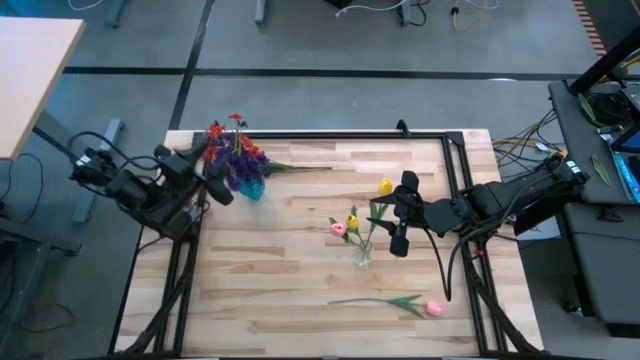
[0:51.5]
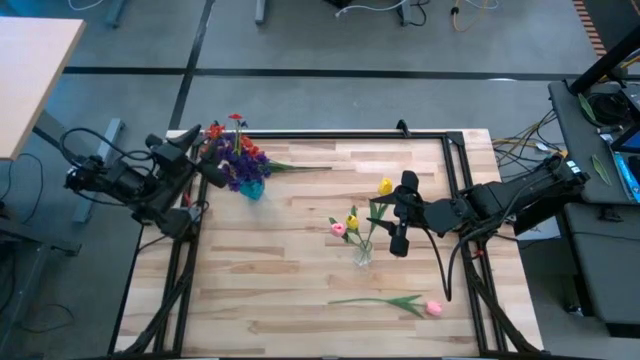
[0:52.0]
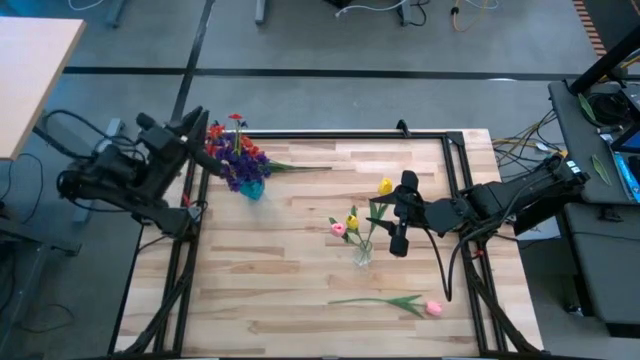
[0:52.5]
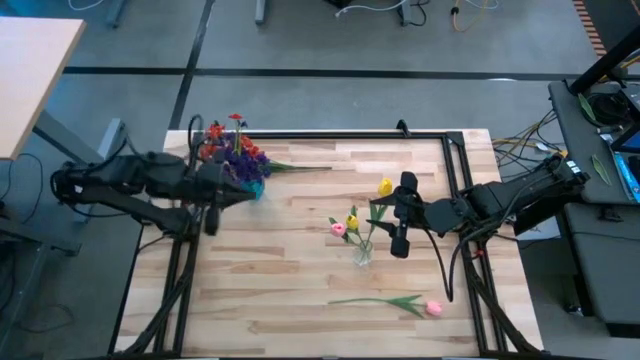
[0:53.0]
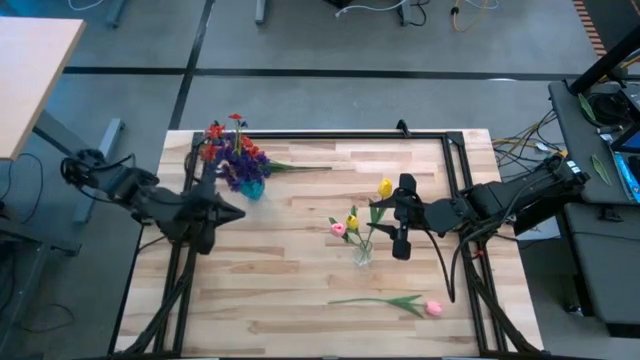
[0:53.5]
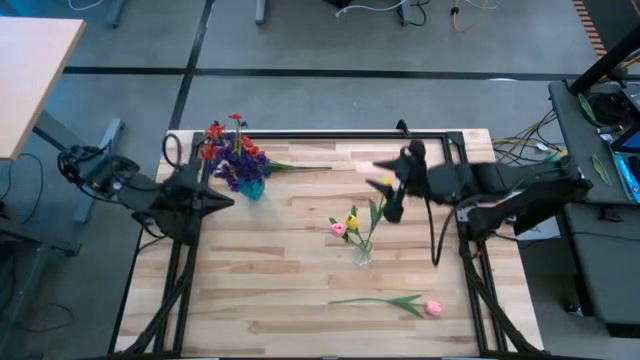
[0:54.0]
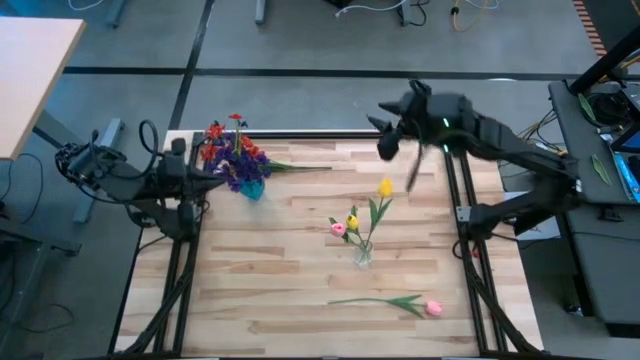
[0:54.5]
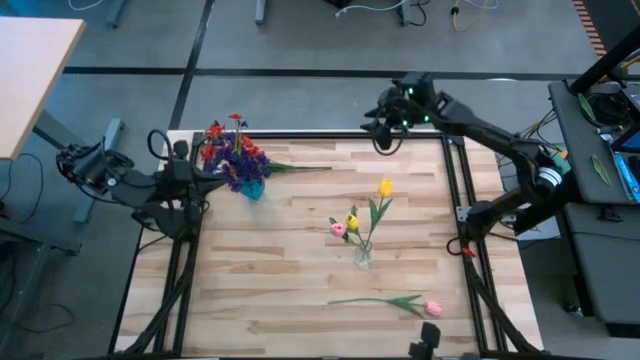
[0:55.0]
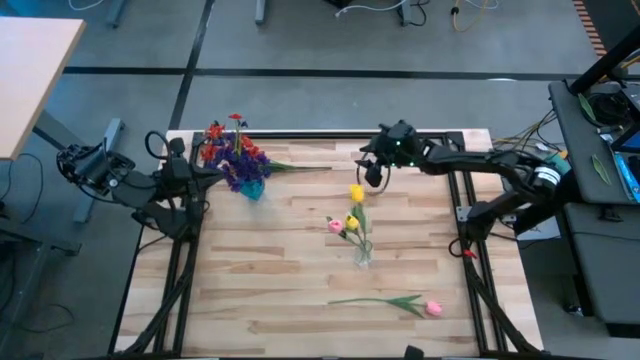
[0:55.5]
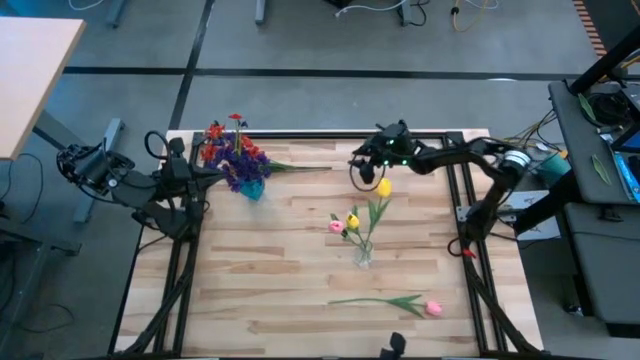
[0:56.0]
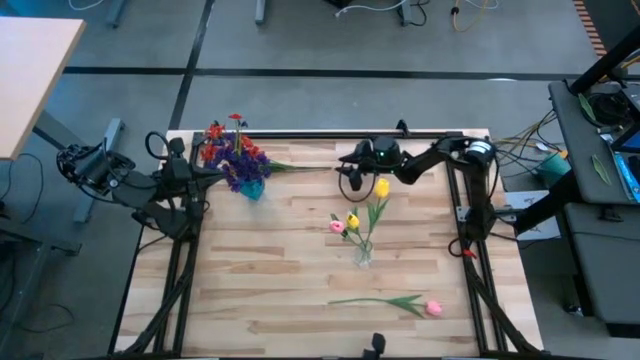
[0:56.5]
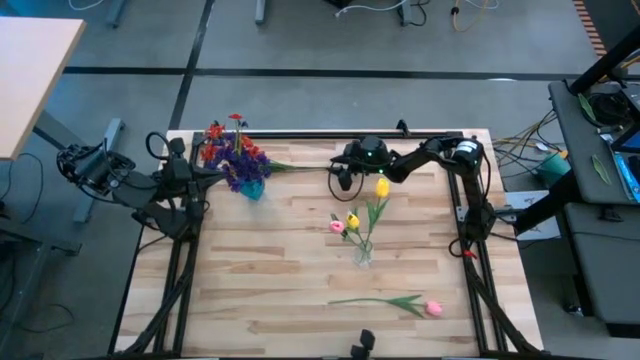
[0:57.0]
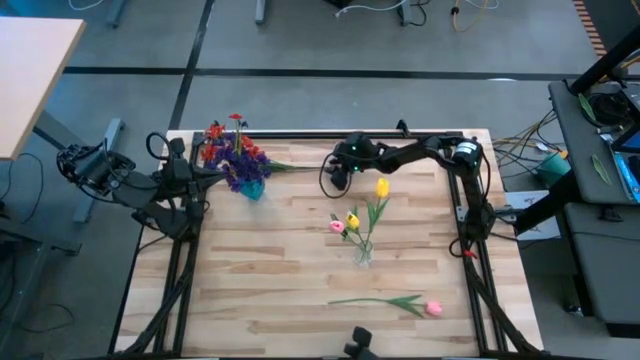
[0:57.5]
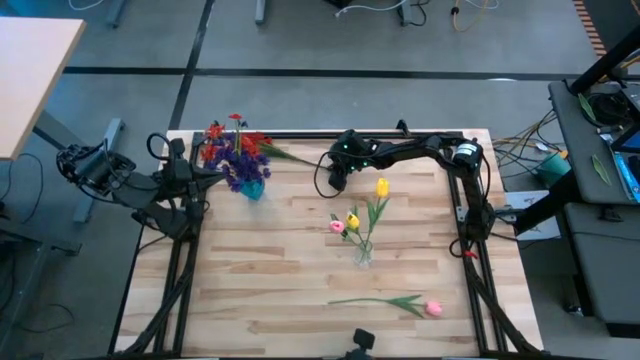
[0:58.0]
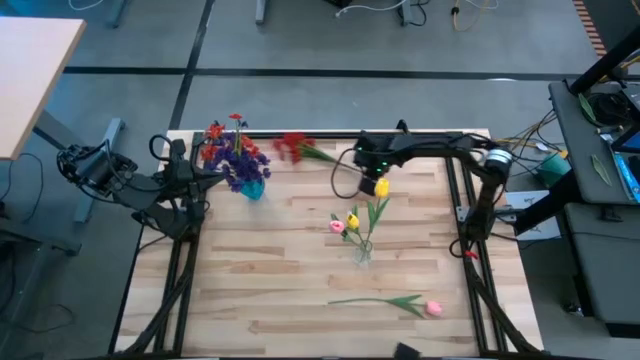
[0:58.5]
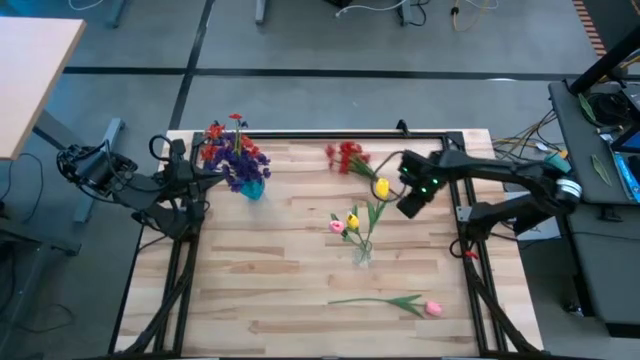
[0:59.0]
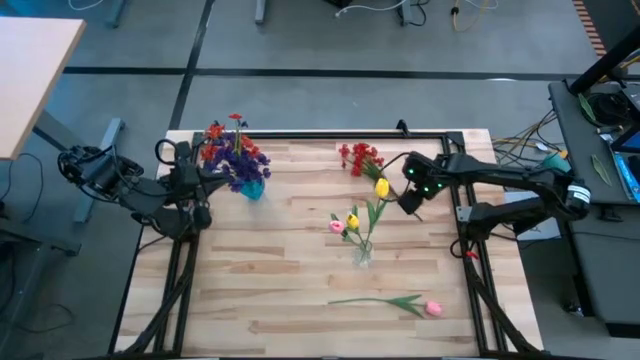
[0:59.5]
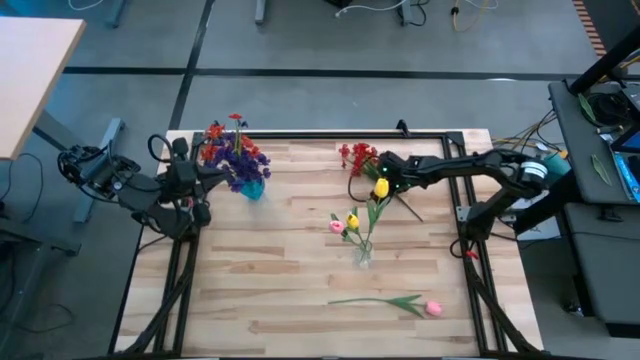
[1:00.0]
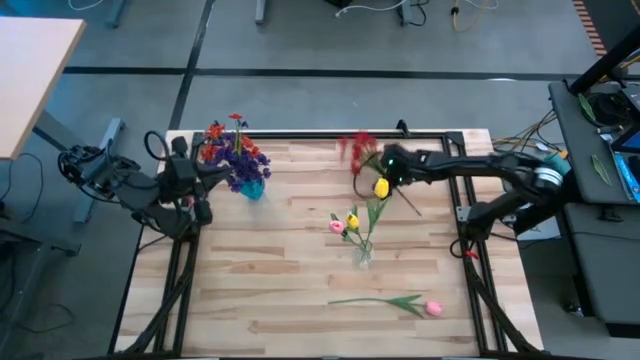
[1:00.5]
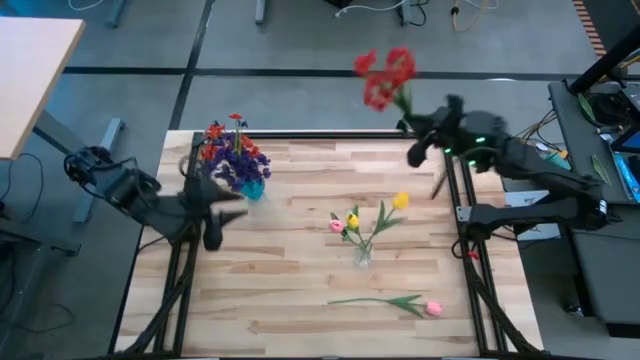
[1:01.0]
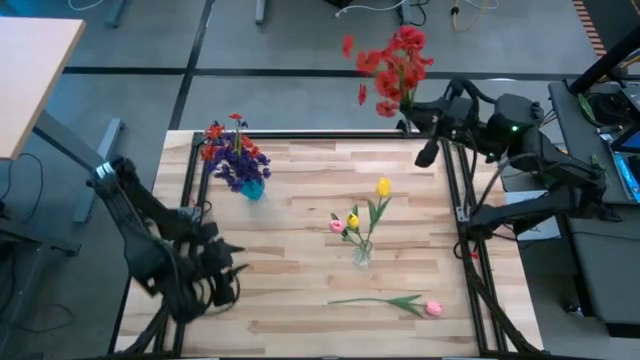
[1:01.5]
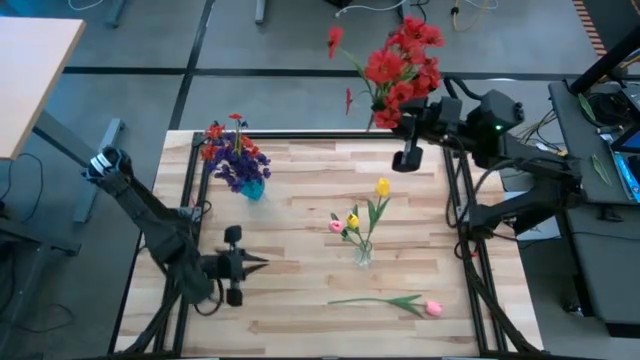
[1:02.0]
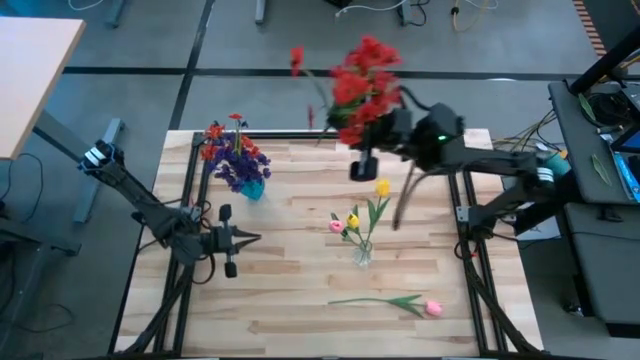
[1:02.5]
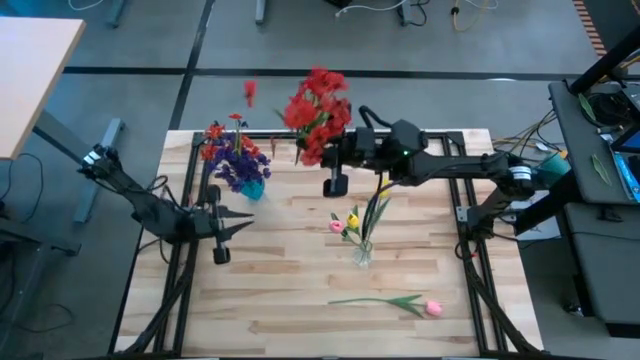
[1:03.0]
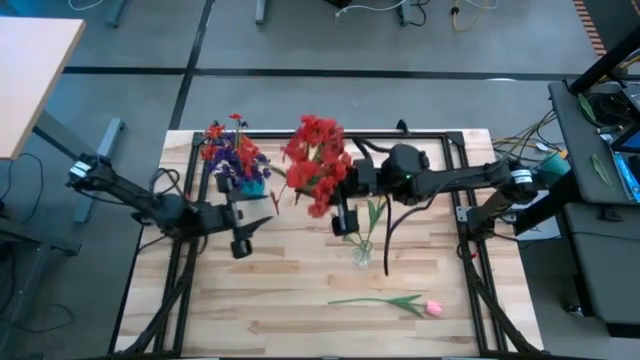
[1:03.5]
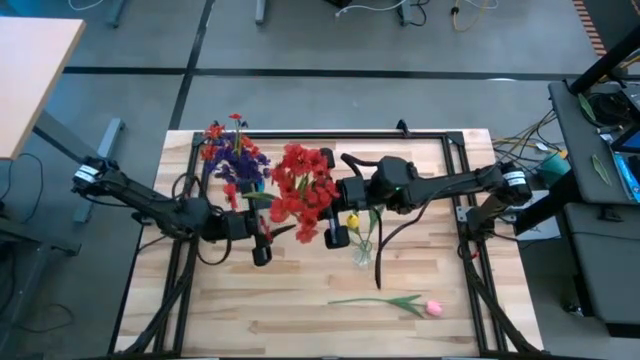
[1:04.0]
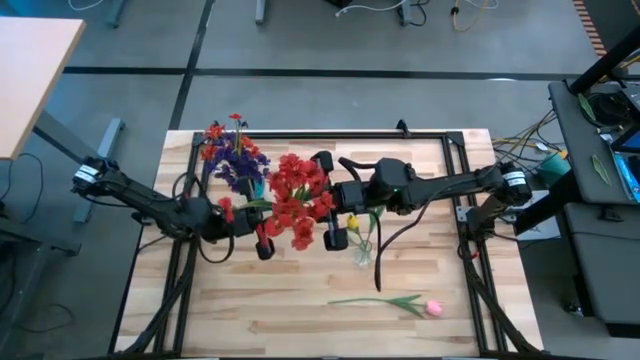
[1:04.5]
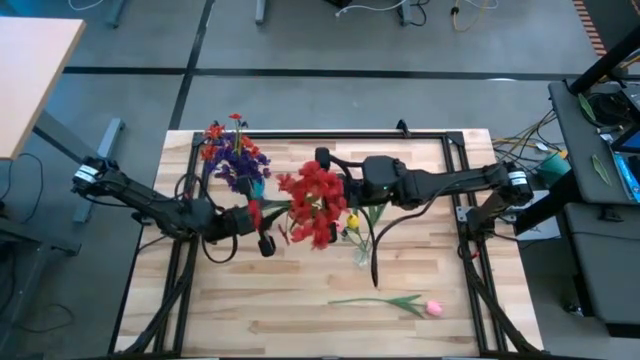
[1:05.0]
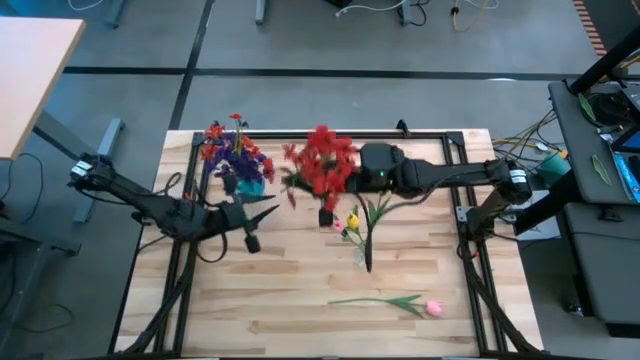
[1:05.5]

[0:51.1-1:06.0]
Task: Sort flowers into vase by color
Put the red flowers into the blue vase

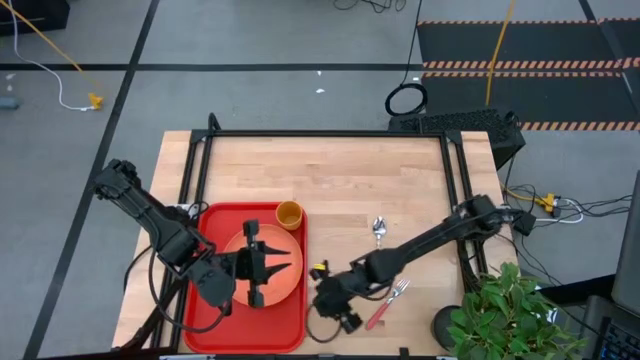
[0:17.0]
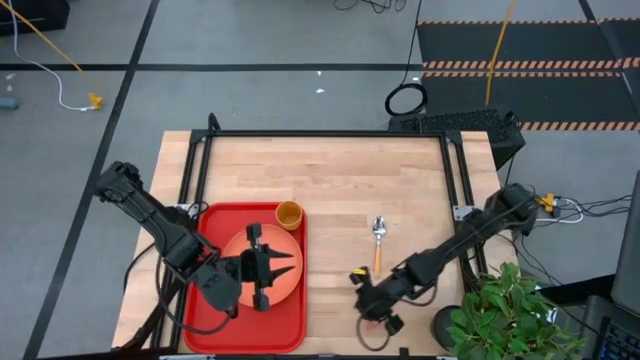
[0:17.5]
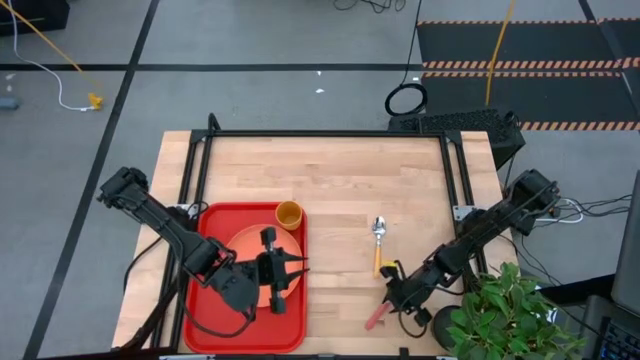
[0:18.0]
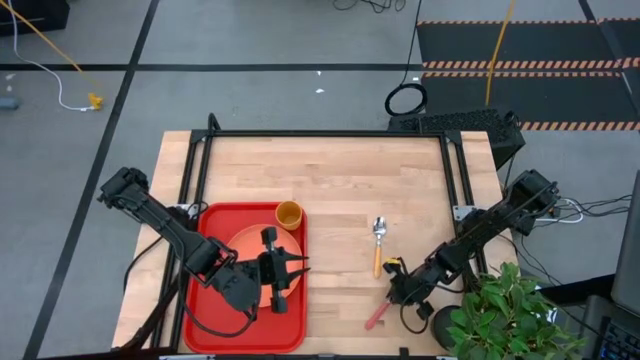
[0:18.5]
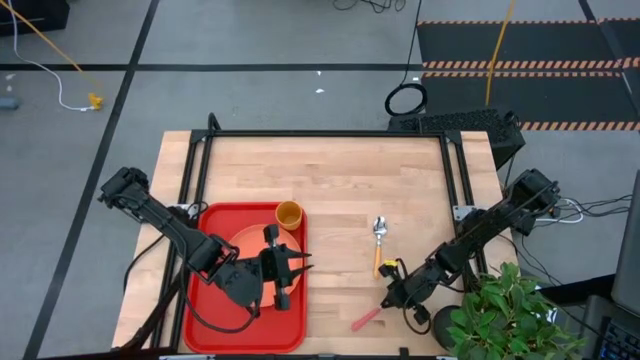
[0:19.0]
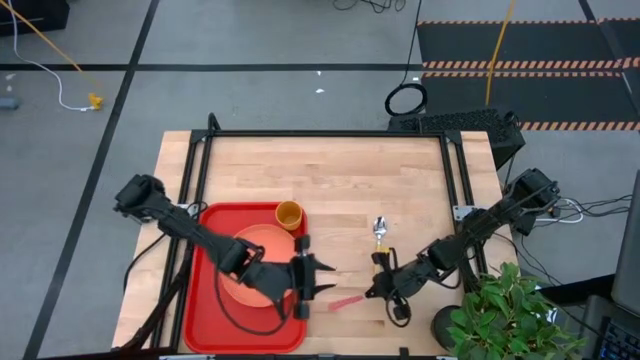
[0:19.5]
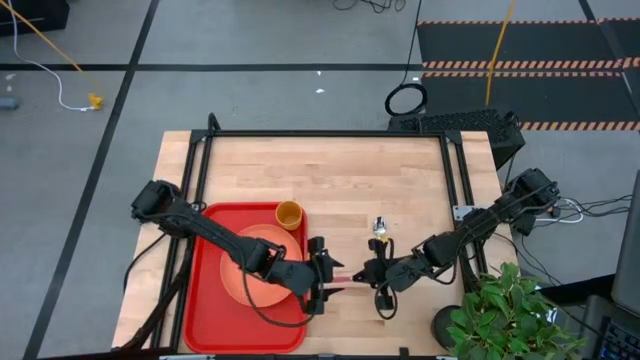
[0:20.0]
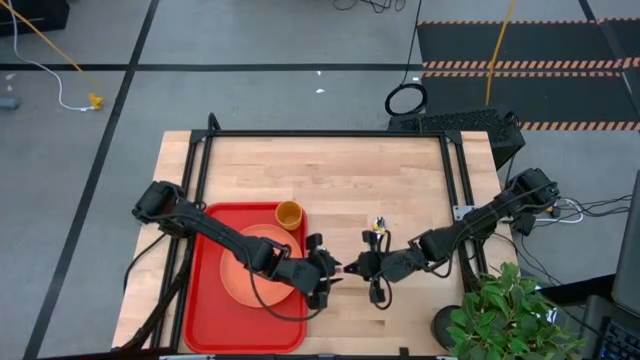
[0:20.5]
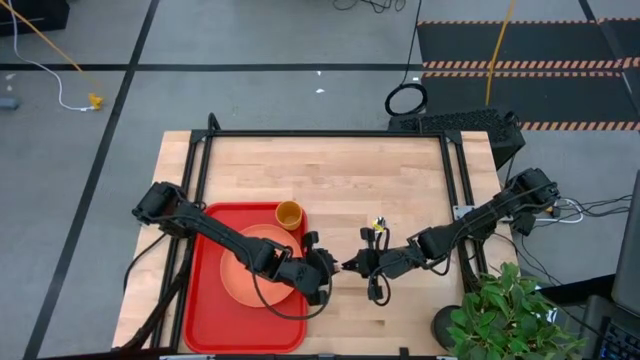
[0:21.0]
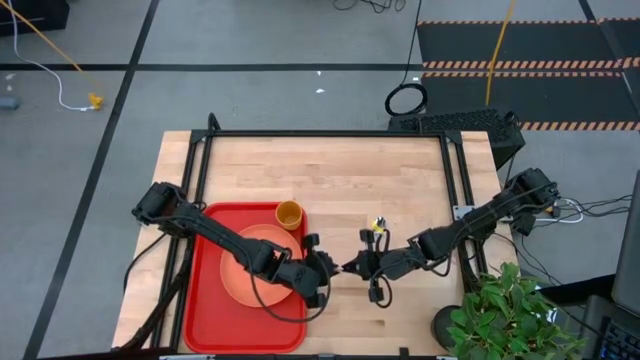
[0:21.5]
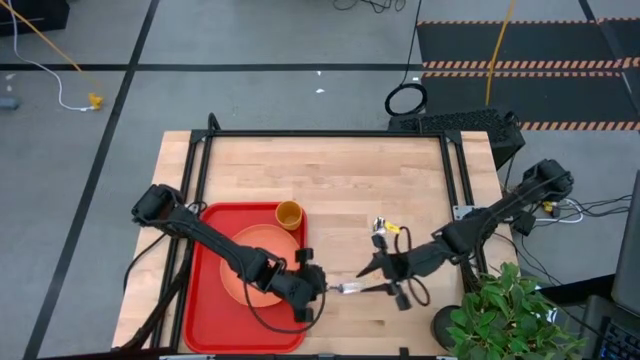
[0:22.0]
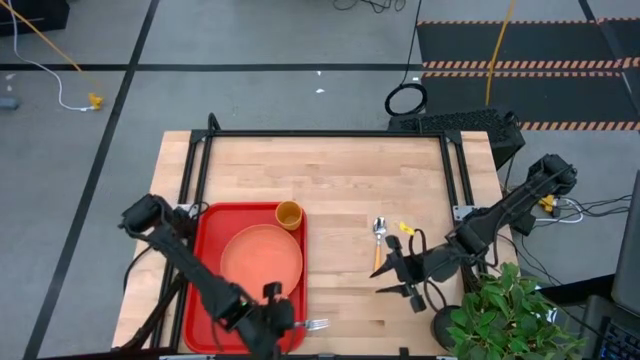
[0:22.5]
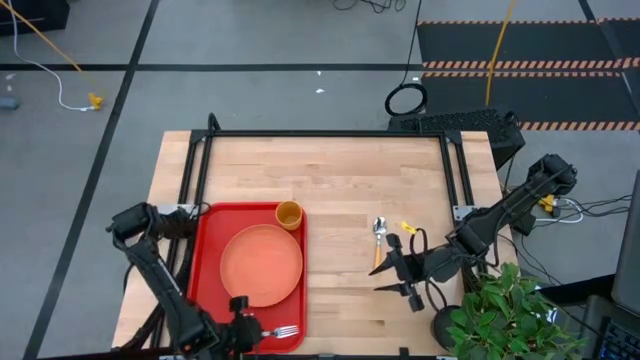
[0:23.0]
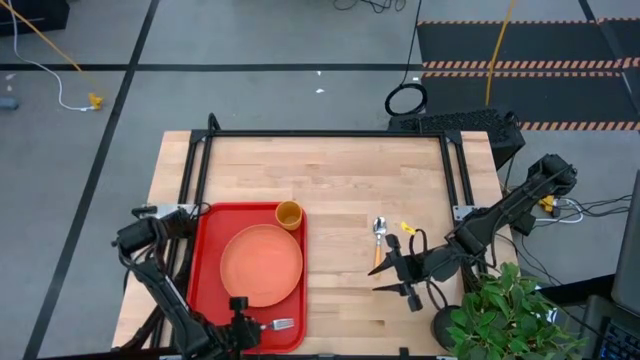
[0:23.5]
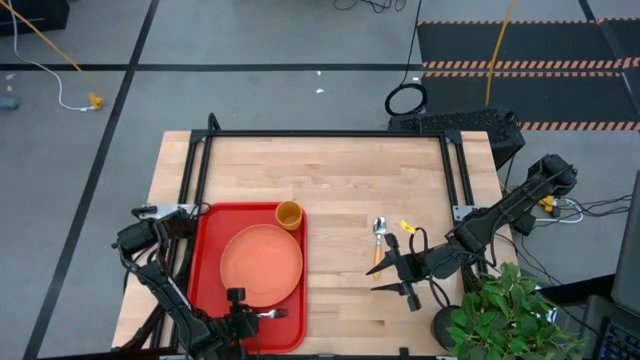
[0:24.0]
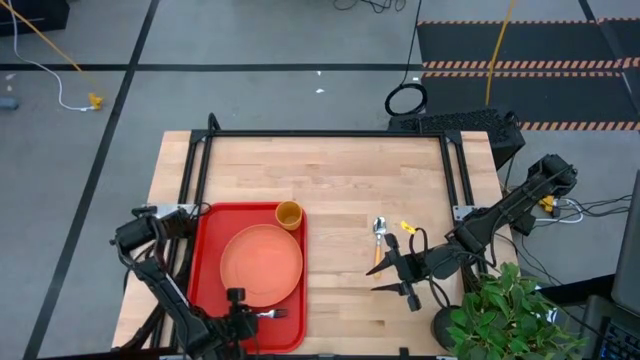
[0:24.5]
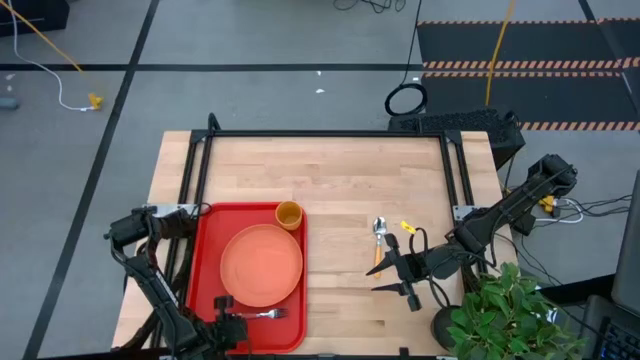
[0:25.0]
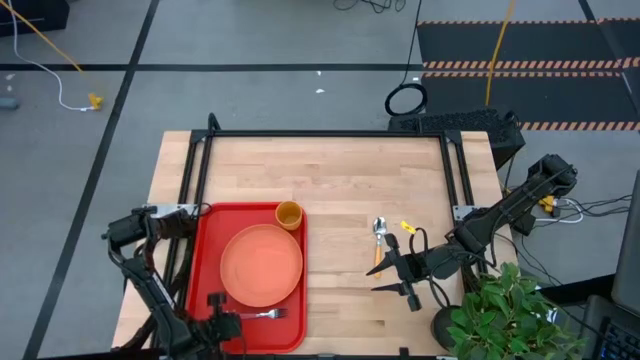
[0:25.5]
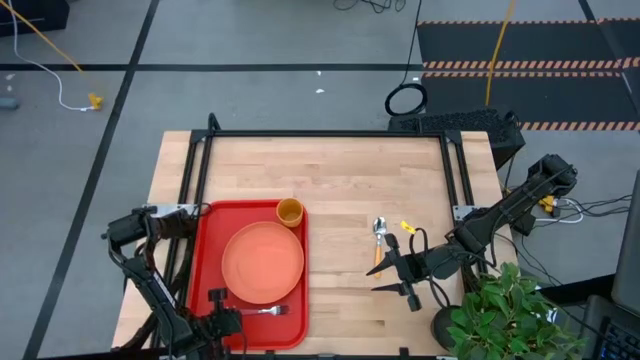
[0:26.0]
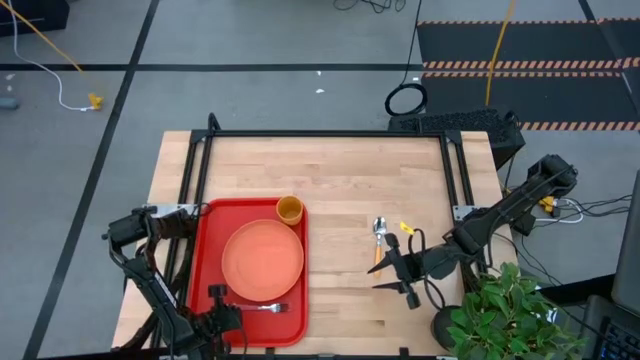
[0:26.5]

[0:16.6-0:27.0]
Task: Pick and place plate/cup/fork/spoon on tray
Put the pink fork on the red tray at the bottom of the orange plate
